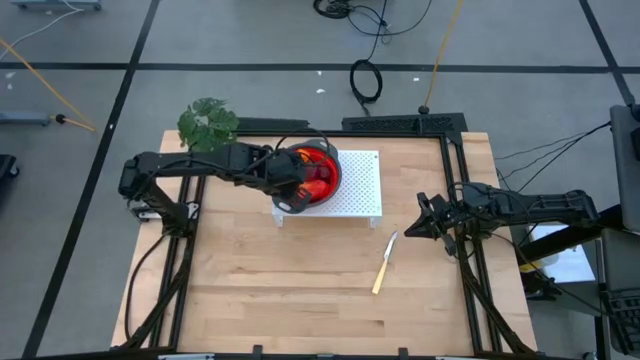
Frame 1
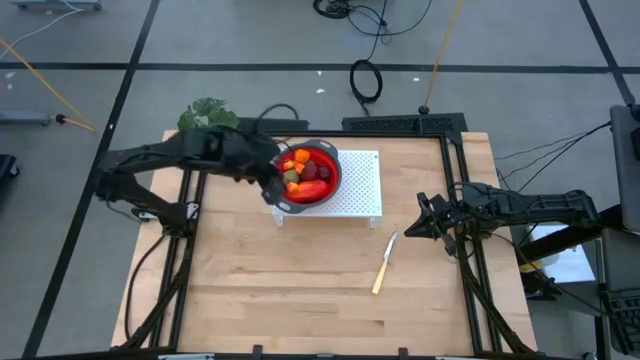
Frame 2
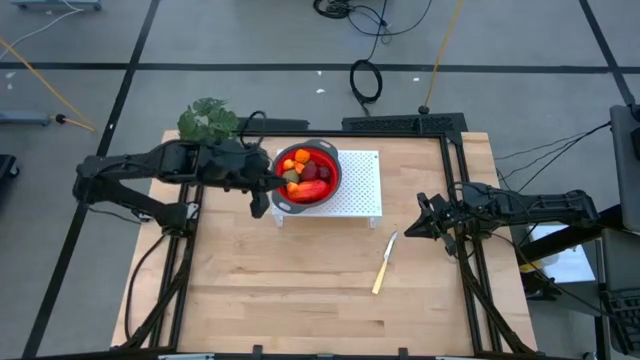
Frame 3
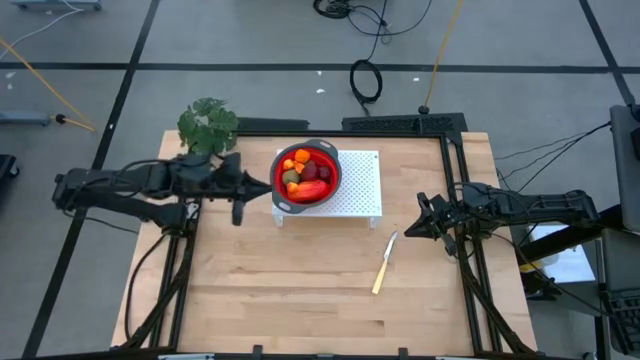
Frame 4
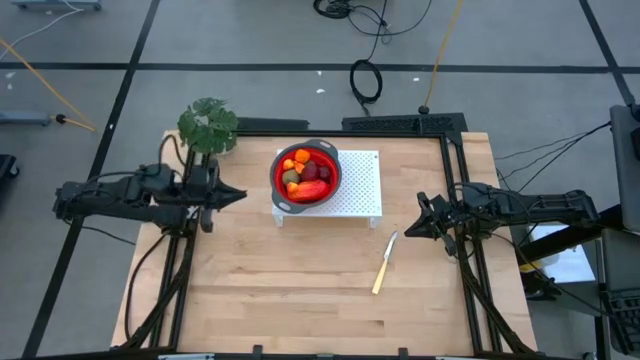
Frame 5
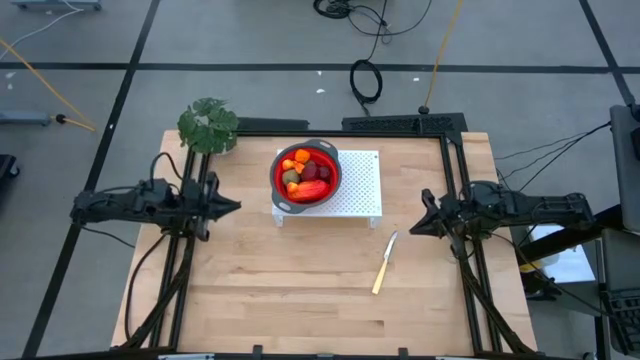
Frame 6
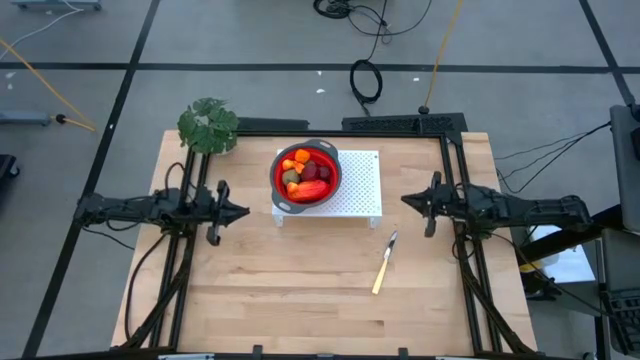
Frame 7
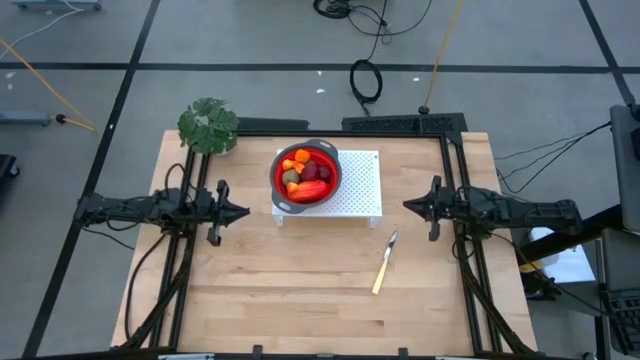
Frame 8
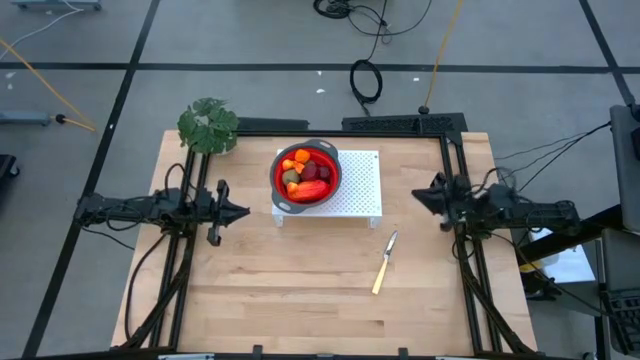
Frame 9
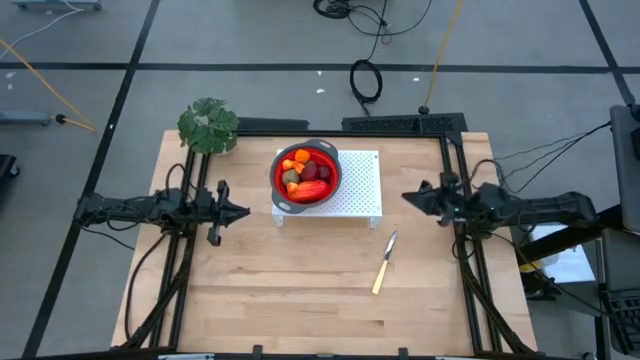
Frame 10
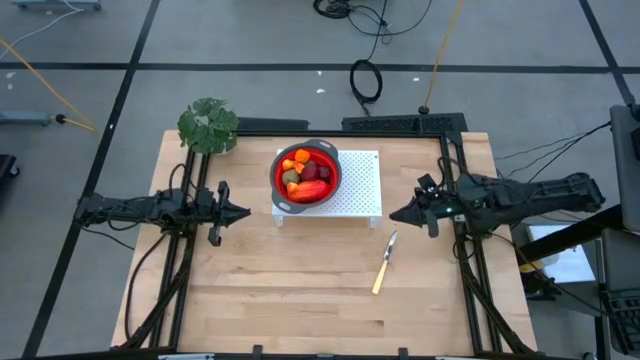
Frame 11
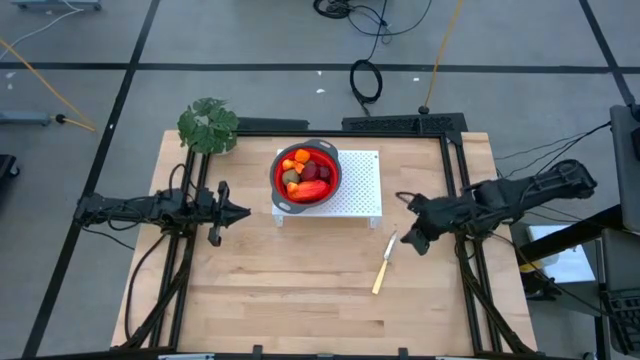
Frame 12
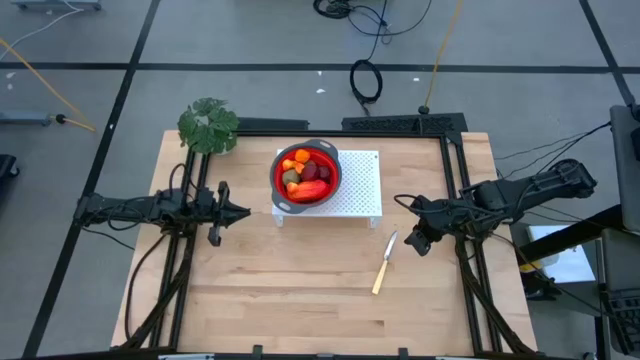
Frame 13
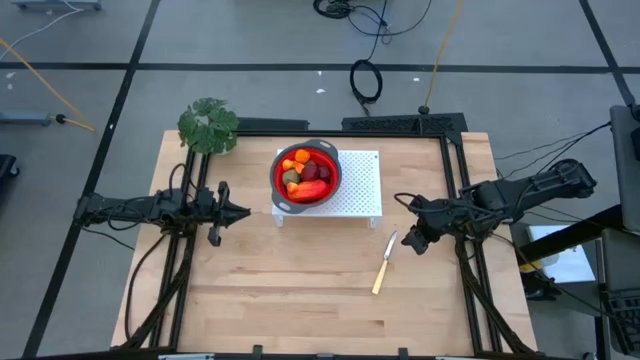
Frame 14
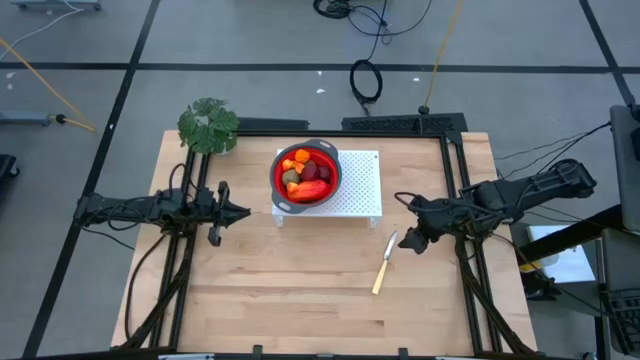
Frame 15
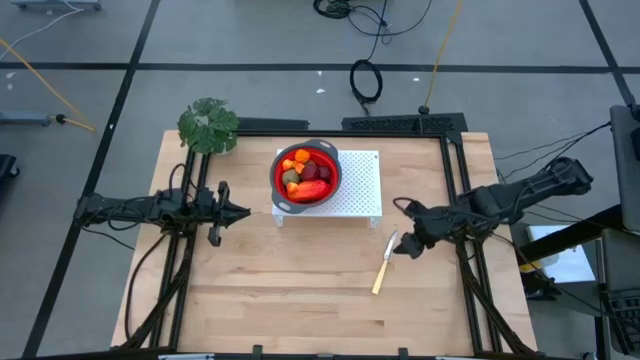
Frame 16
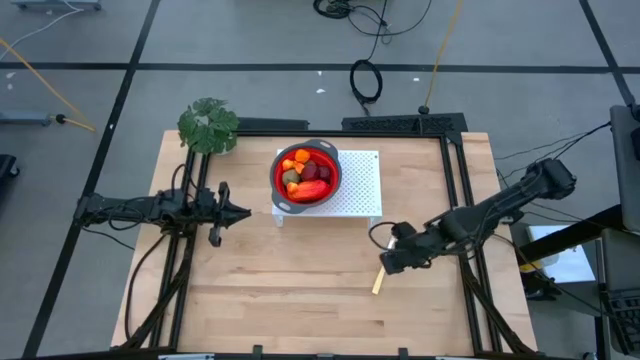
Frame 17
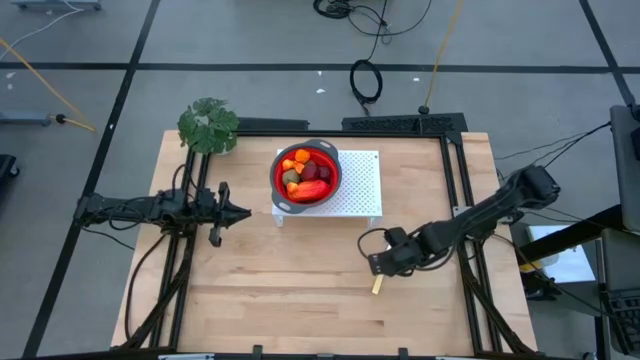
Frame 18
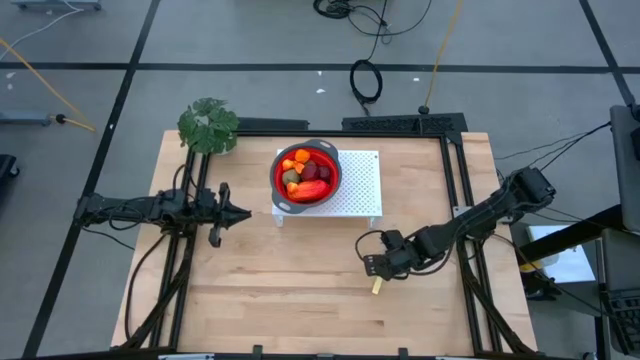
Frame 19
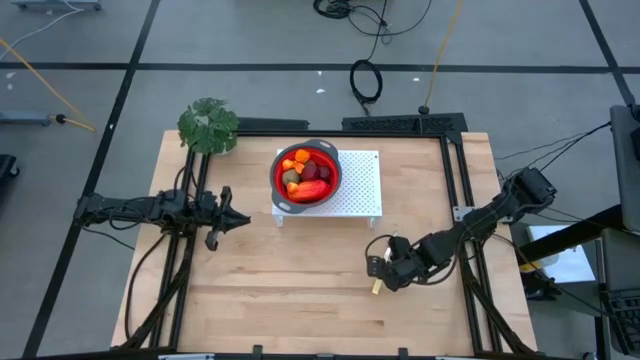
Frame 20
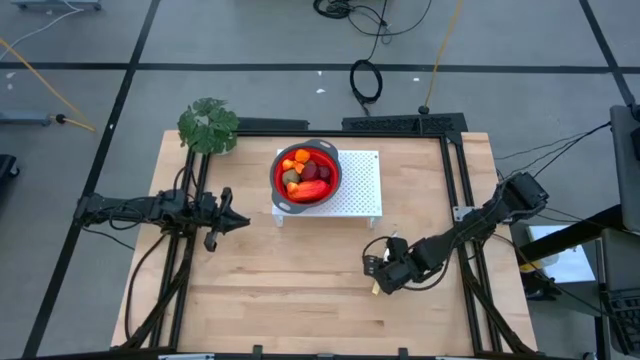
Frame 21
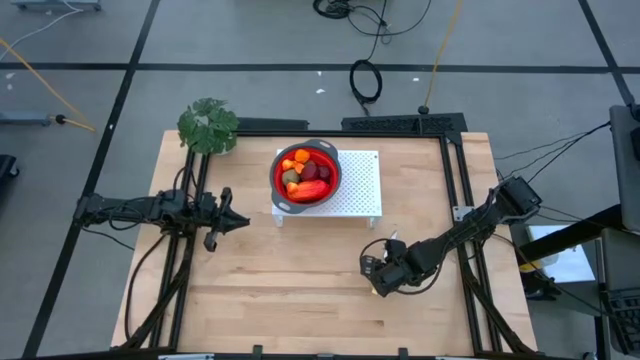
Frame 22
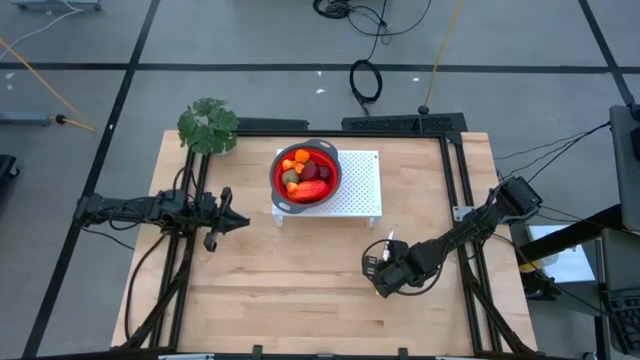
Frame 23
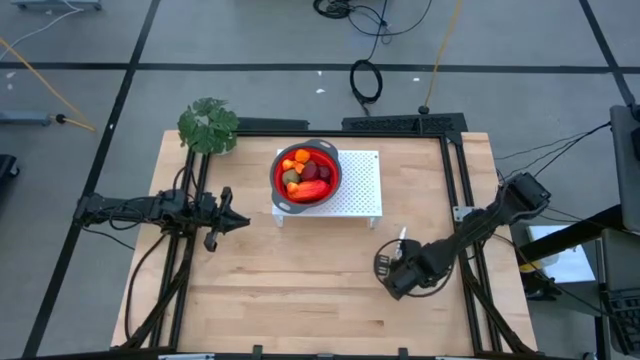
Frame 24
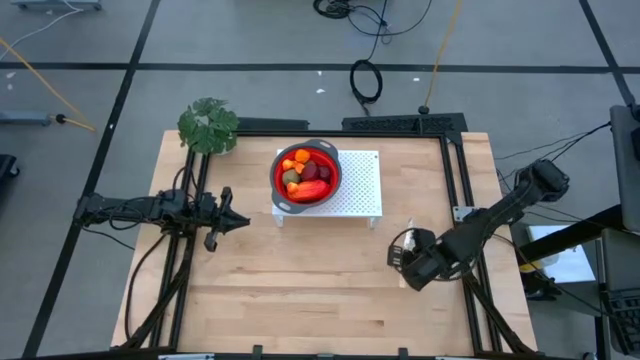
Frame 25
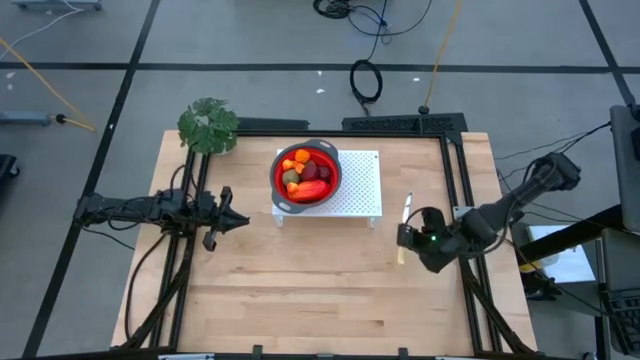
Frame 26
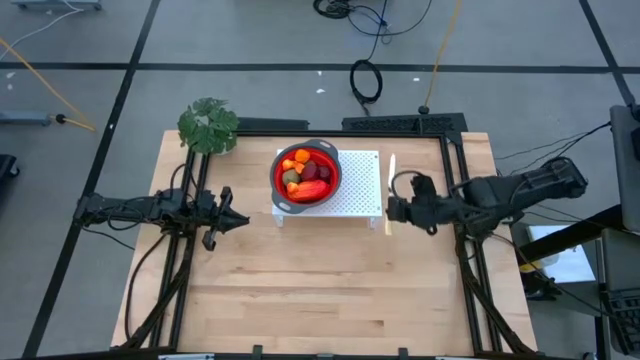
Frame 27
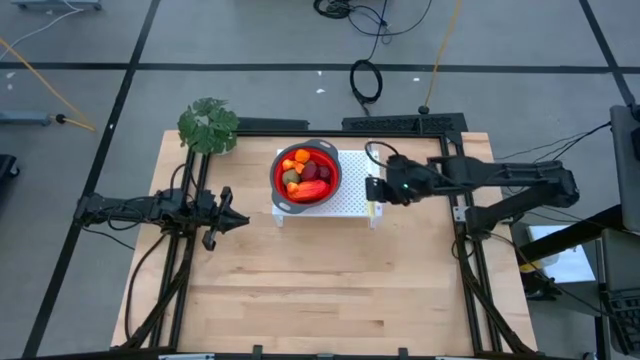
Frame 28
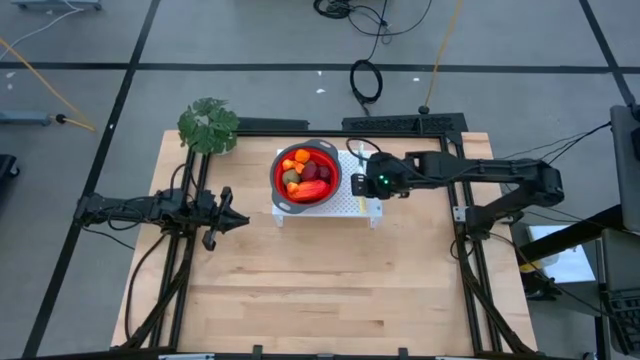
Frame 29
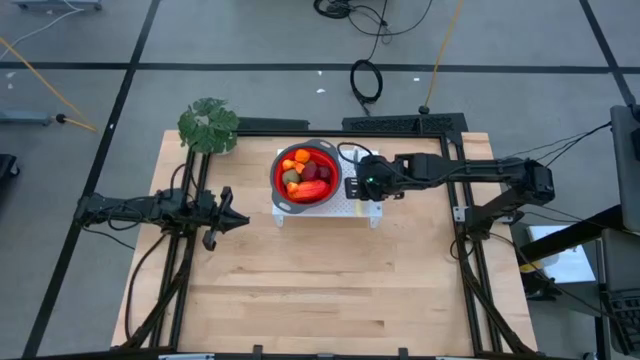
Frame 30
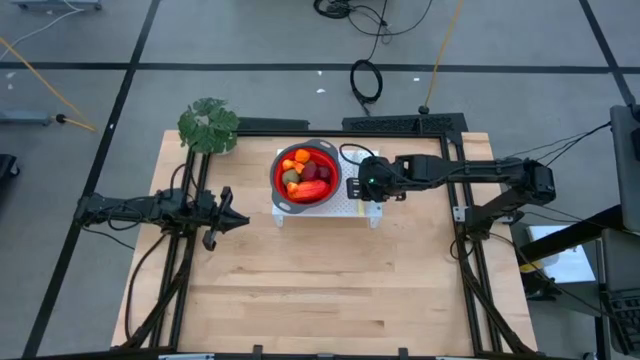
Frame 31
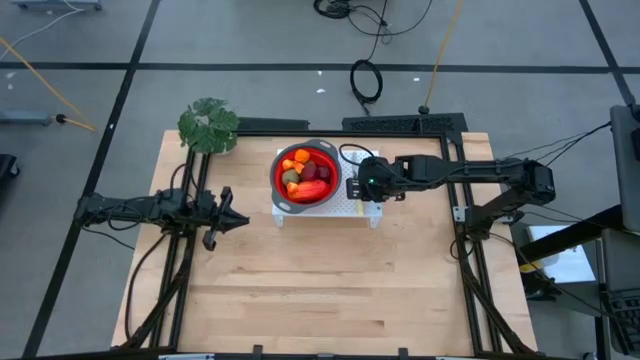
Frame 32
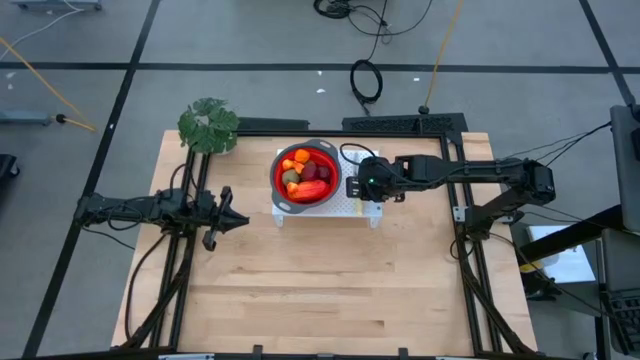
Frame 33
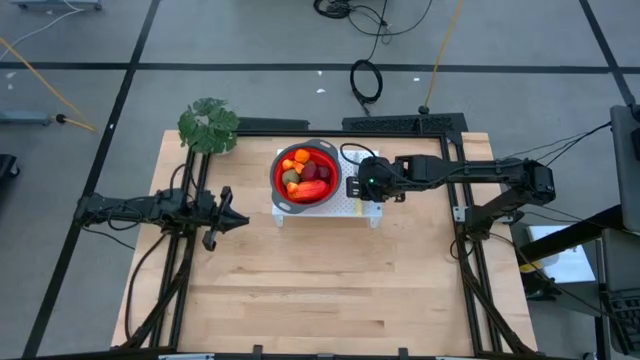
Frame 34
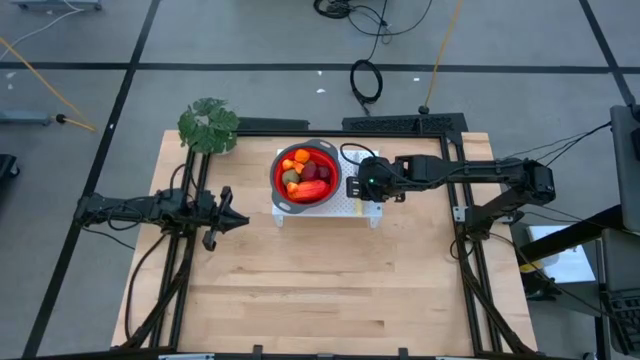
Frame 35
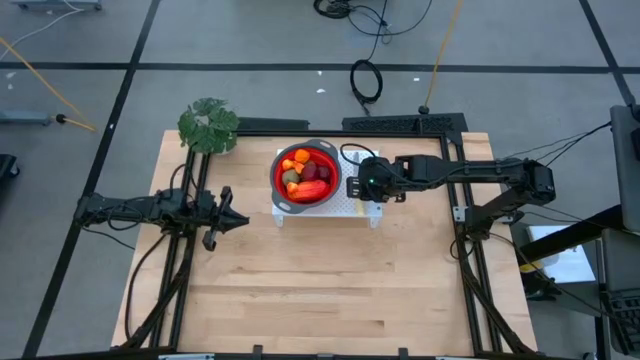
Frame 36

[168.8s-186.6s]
Task: Pick & Place Fruit
Put the yellow knife on of the shelf

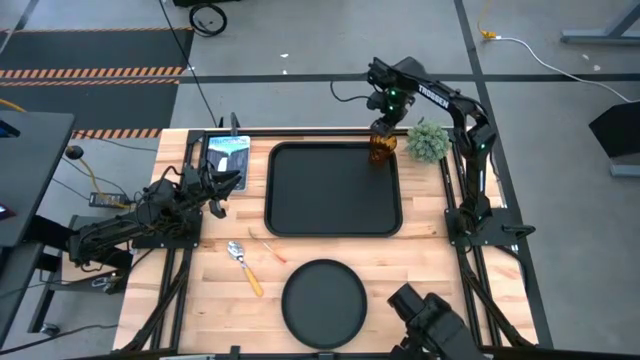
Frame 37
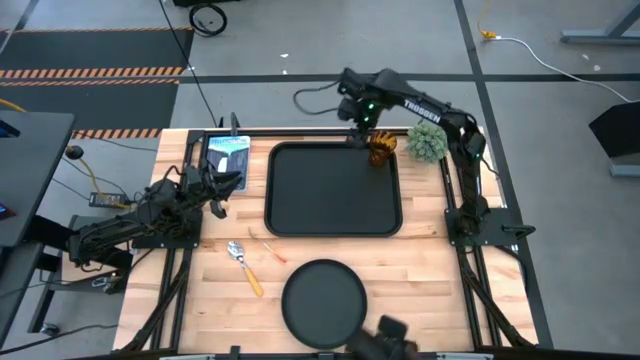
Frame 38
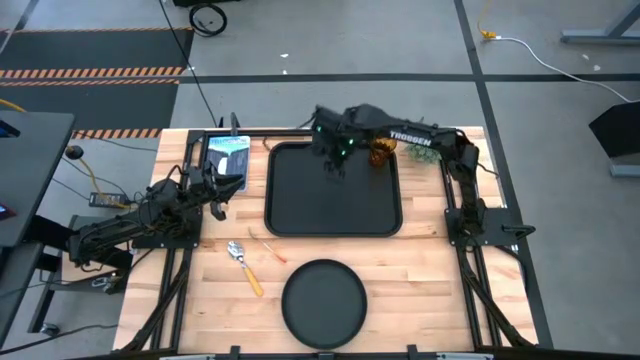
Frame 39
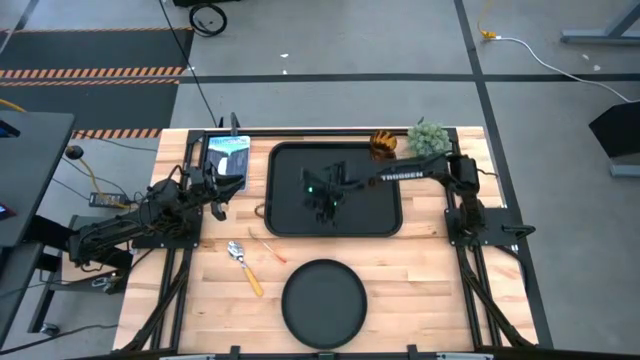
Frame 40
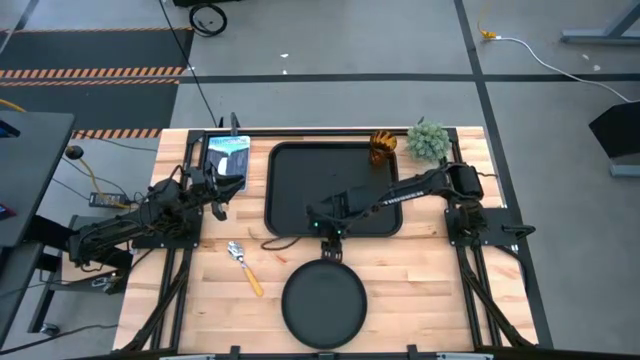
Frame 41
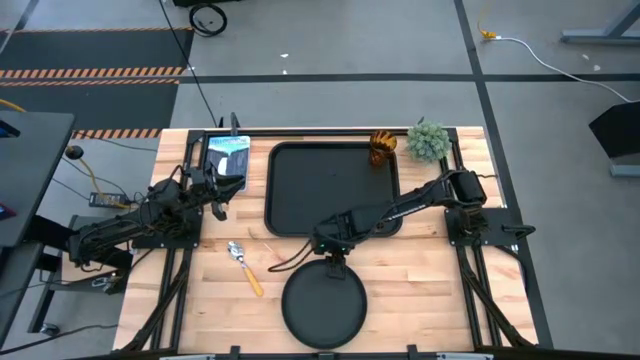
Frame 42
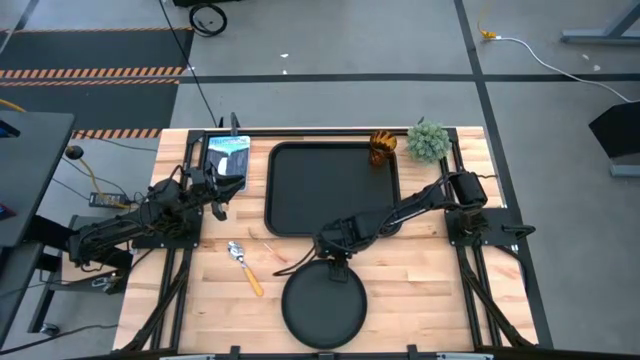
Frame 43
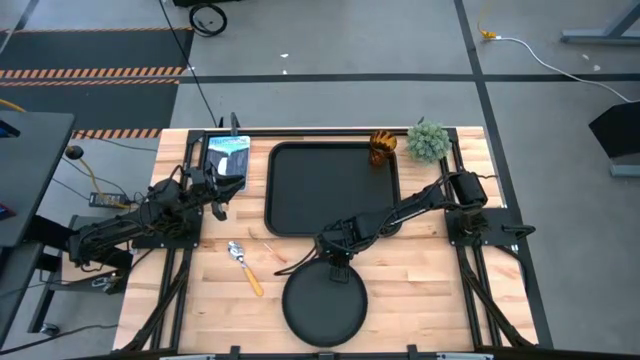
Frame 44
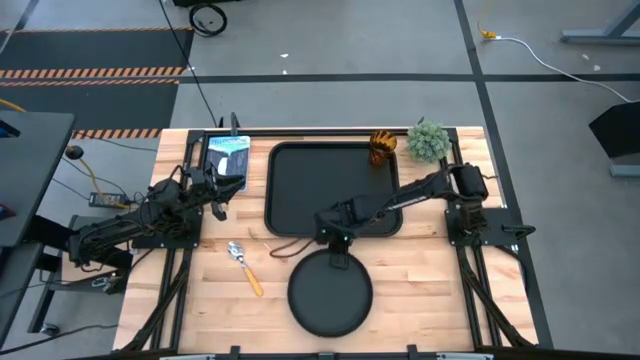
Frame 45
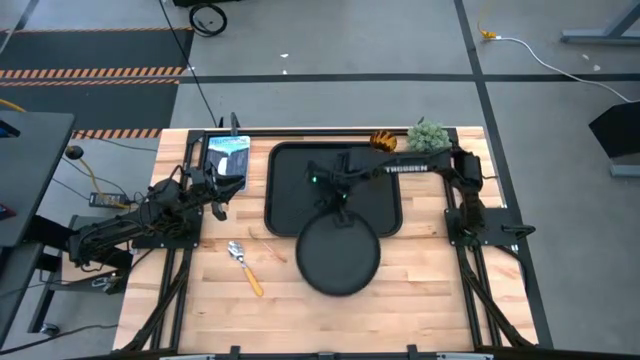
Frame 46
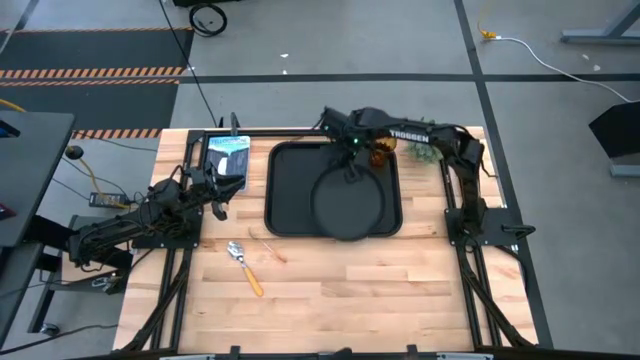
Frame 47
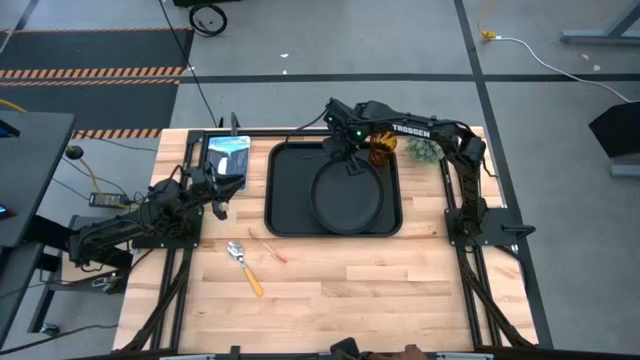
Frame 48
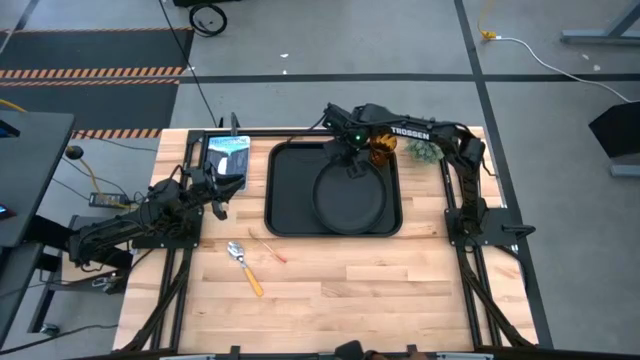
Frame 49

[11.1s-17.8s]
Task: Pick and place plate/cup/fork/spoon on tray
Put the black plate at the bottom of the brown cup on the black tray
